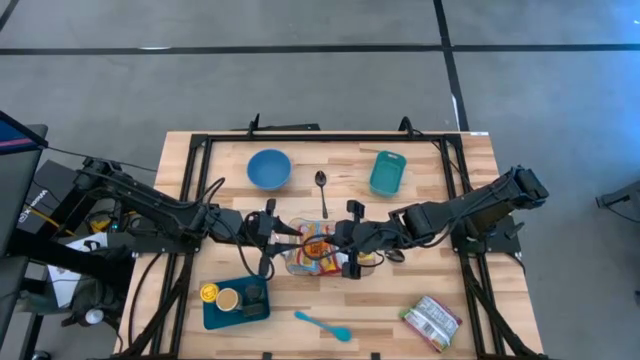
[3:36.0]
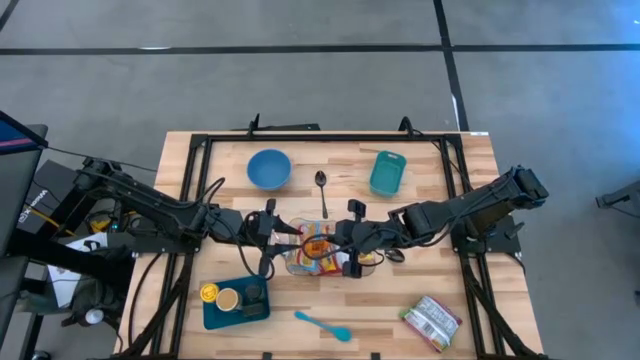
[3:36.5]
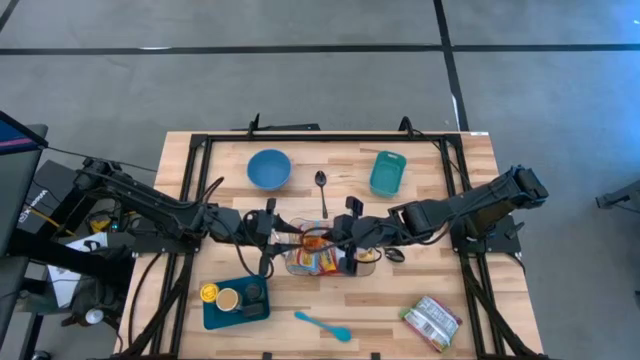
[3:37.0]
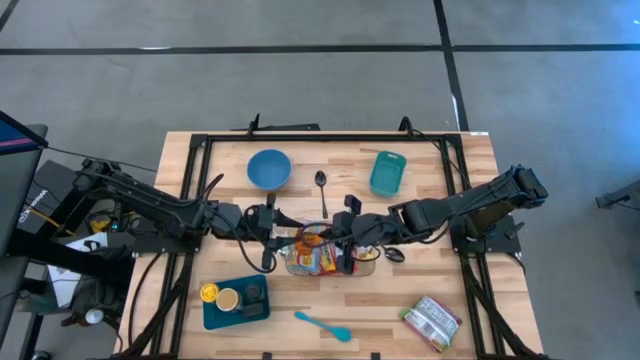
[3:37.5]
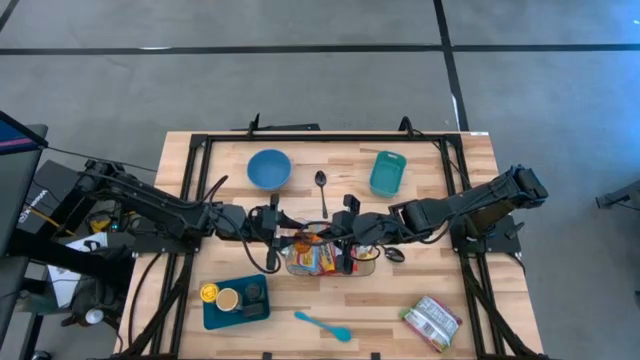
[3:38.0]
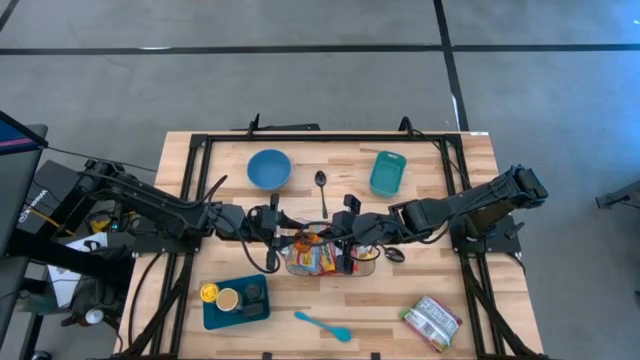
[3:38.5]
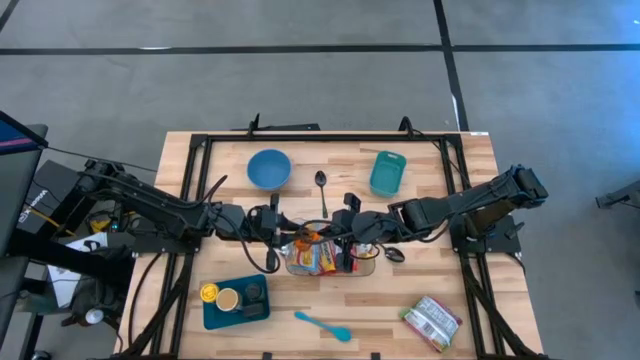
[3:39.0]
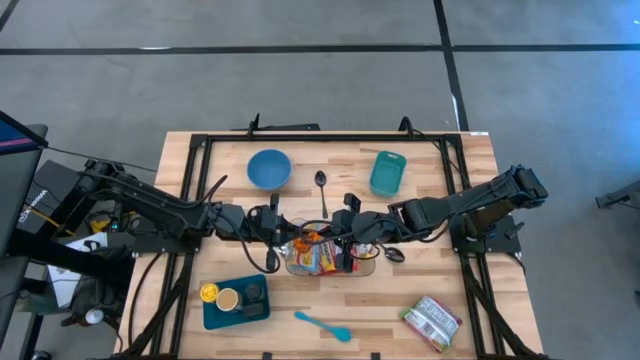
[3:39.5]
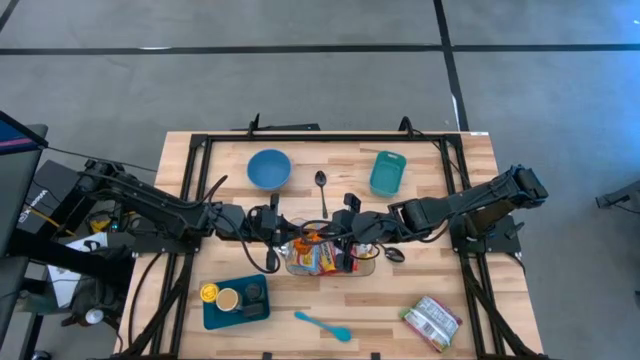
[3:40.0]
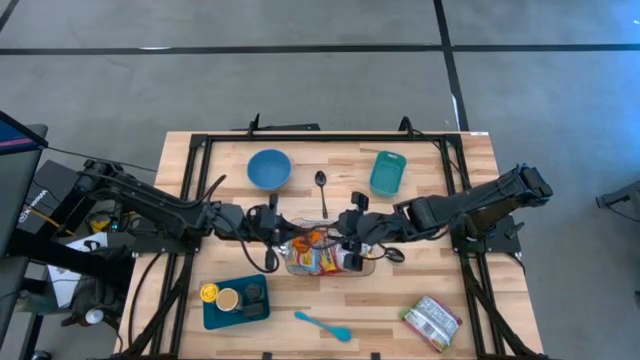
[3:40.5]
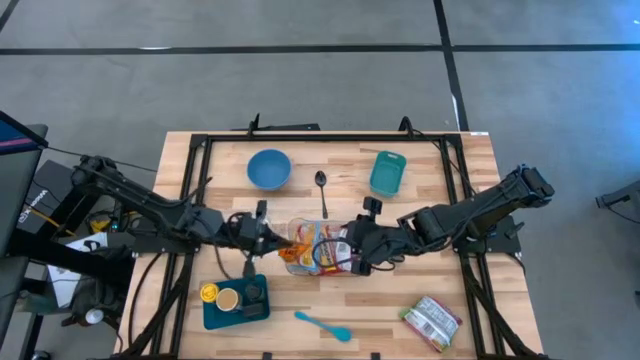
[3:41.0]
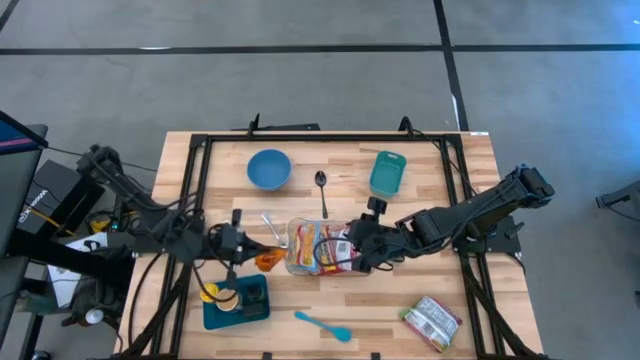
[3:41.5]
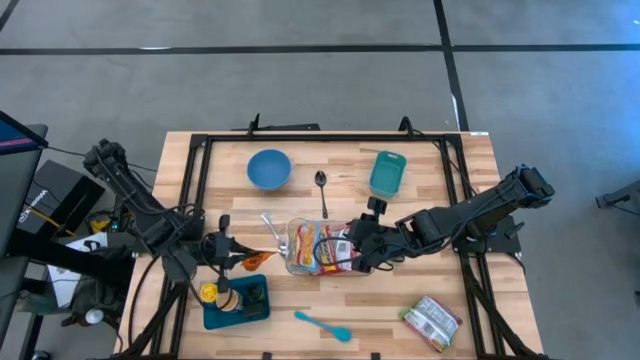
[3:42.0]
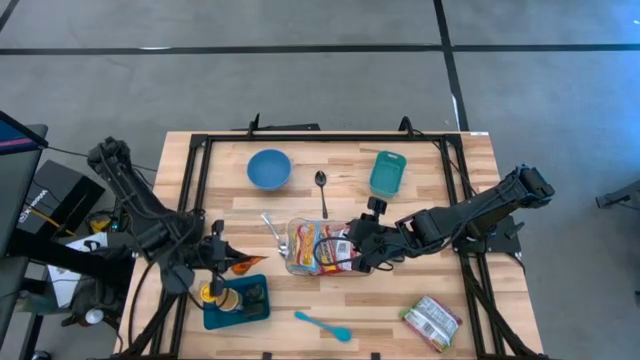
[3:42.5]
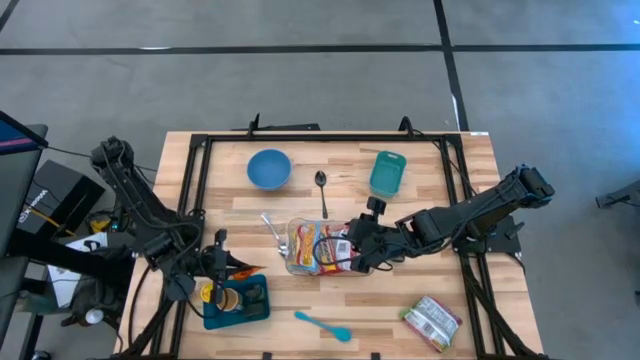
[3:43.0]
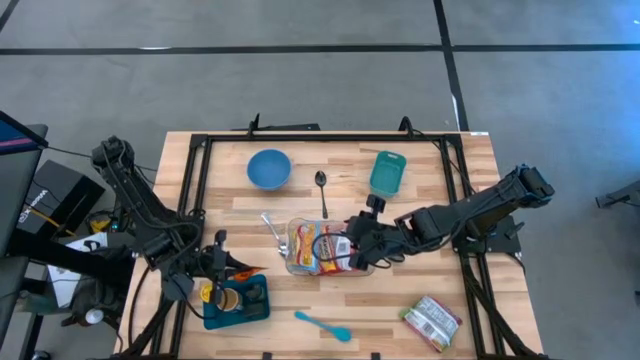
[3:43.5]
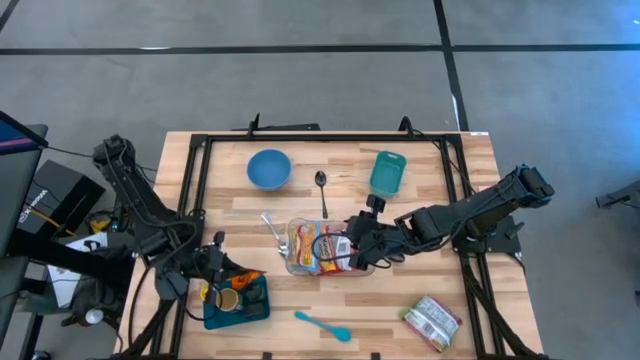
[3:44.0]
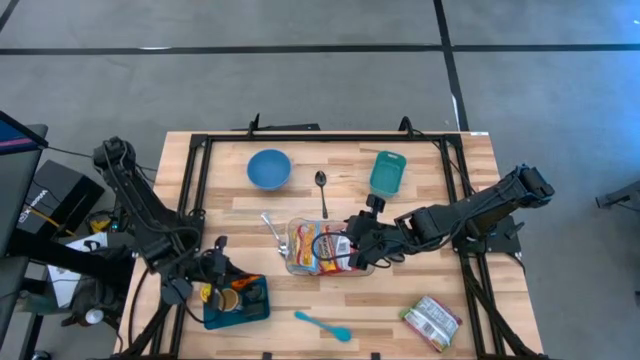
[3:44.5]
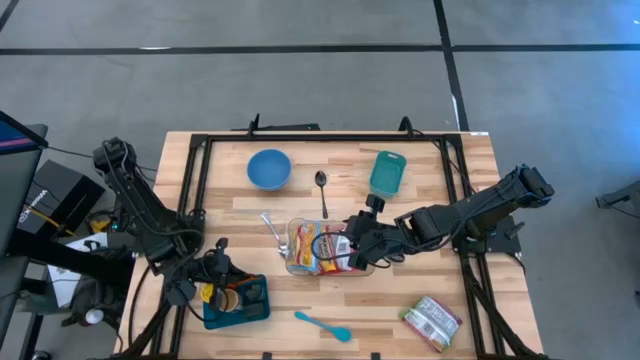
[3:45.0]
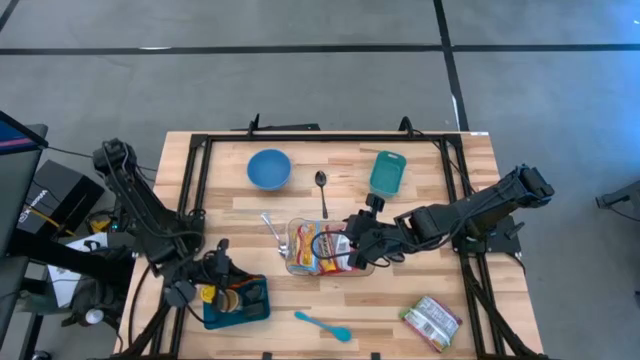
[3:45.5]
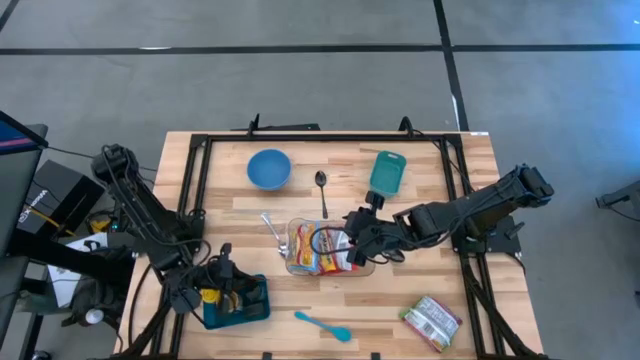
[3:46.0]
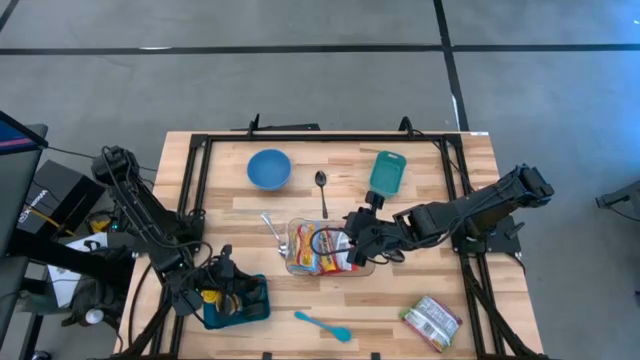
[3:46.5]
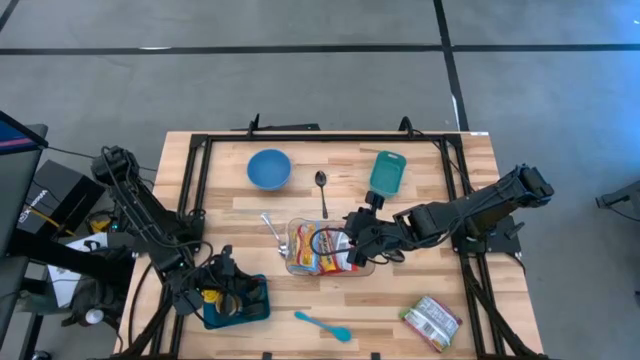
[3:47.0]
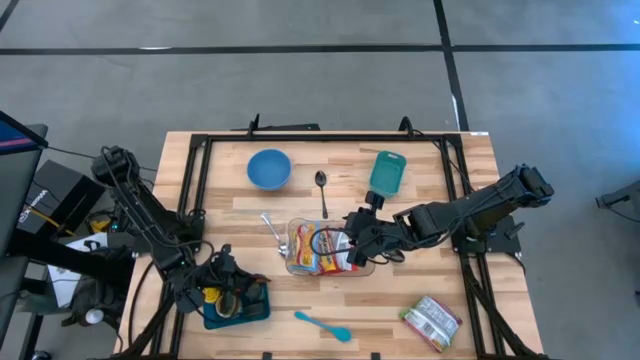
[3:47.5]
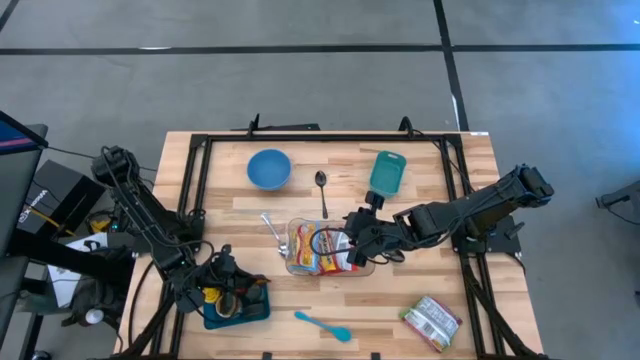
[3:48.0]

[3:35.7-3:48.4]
Task: Pick & Place Food Item
Put the orange spice bag into the dark blue bin

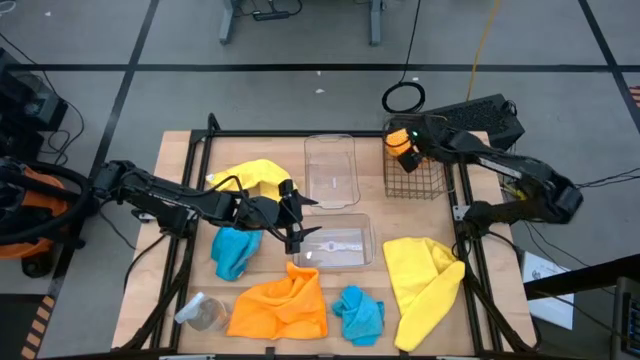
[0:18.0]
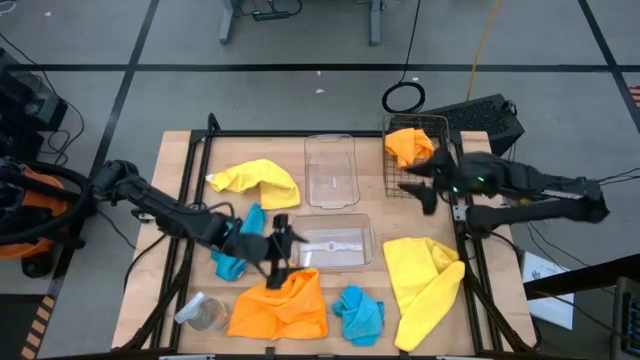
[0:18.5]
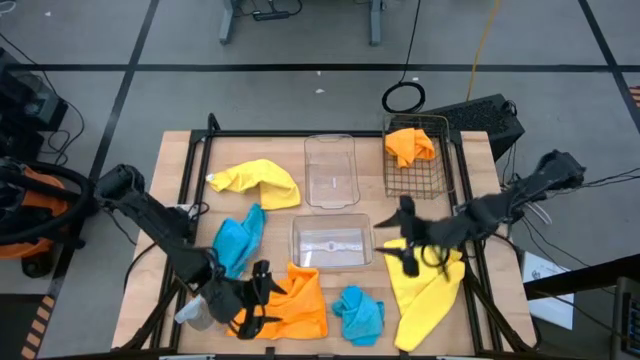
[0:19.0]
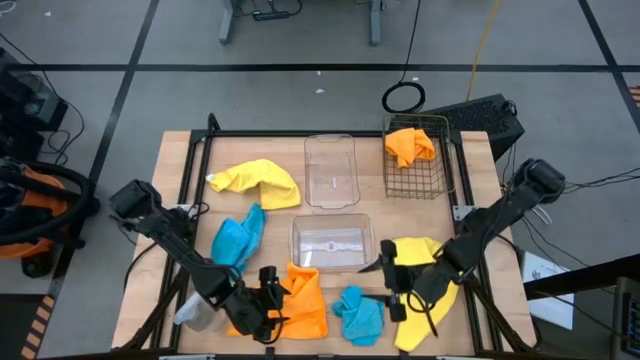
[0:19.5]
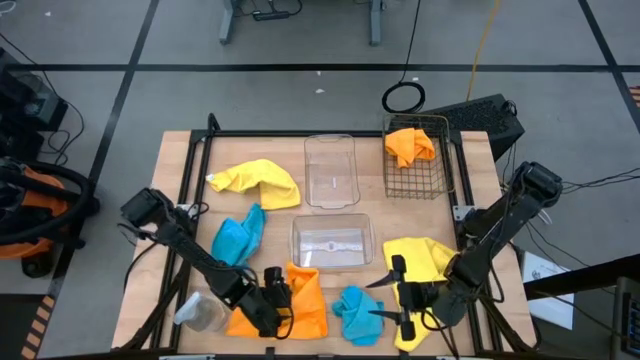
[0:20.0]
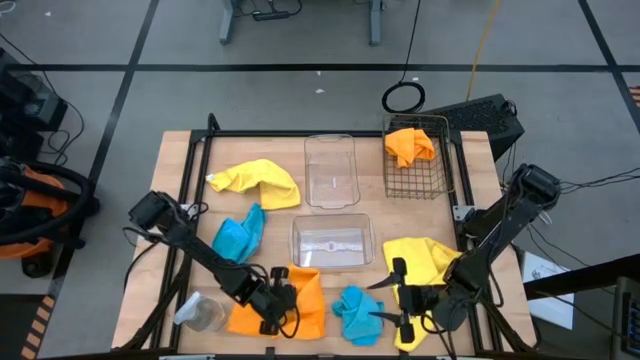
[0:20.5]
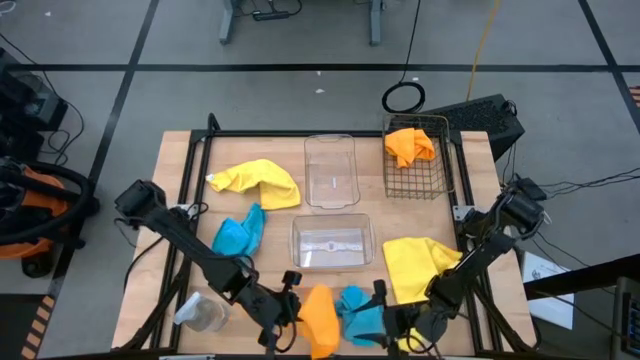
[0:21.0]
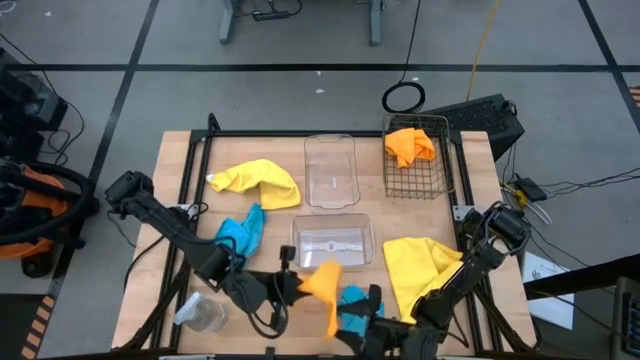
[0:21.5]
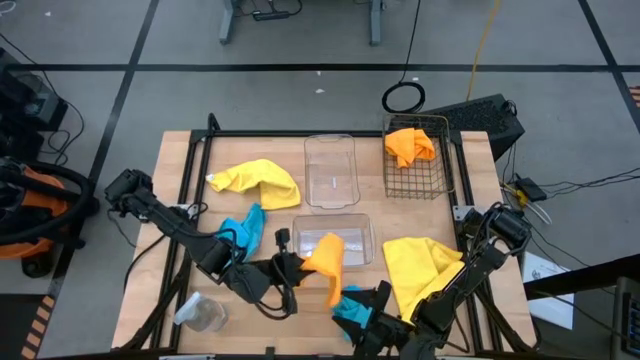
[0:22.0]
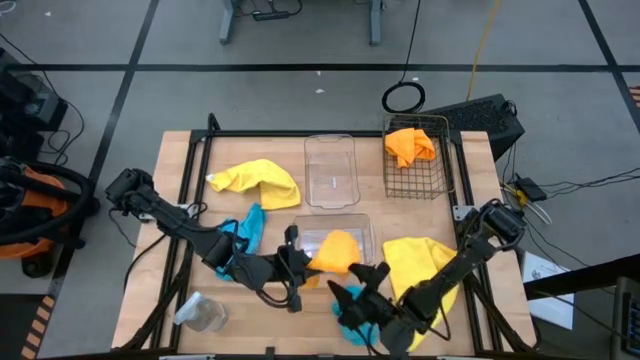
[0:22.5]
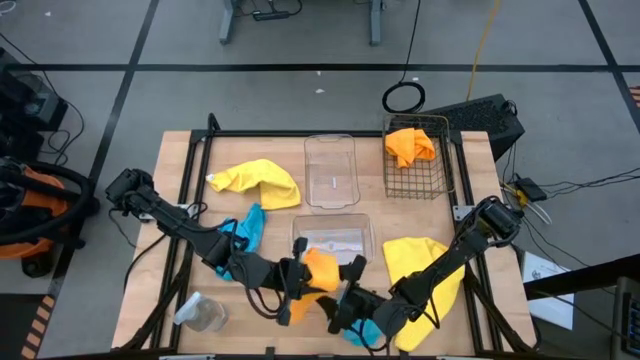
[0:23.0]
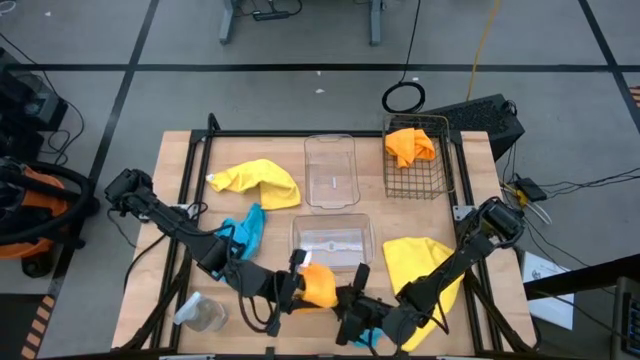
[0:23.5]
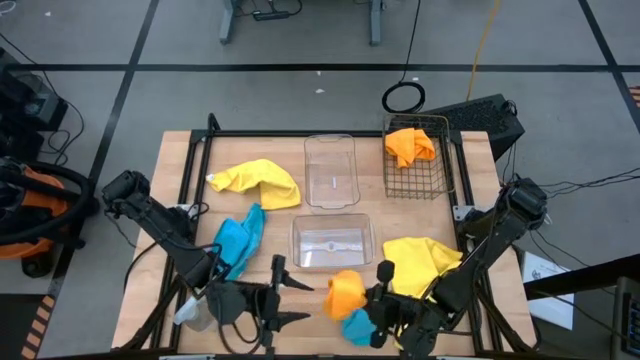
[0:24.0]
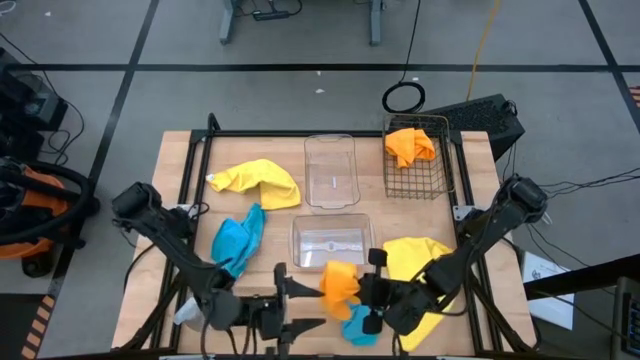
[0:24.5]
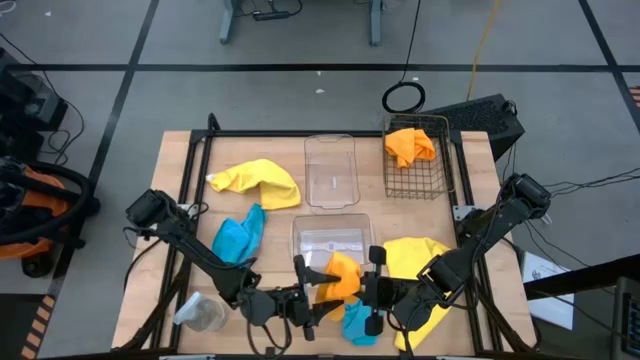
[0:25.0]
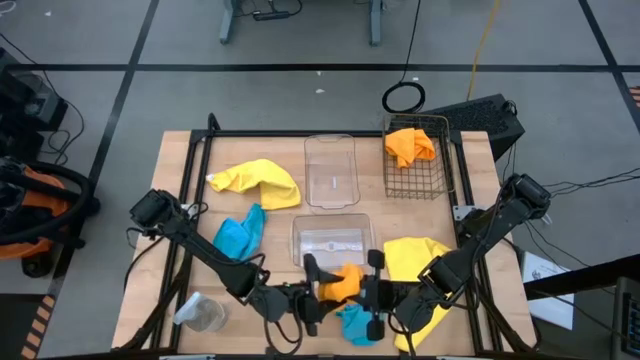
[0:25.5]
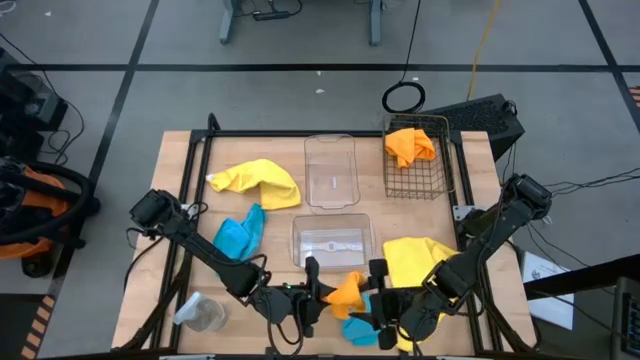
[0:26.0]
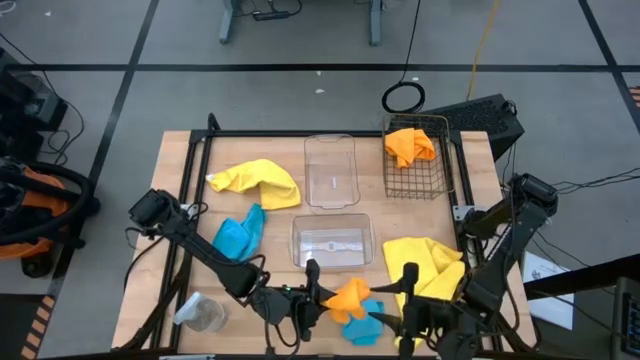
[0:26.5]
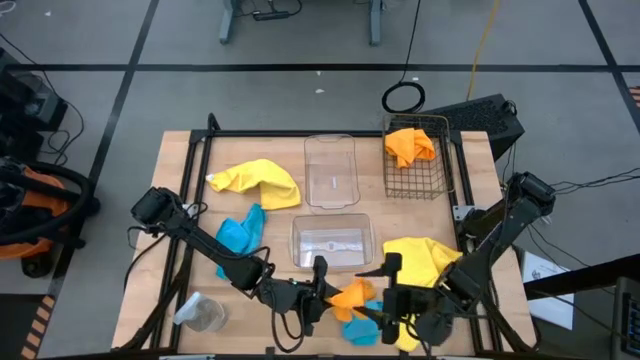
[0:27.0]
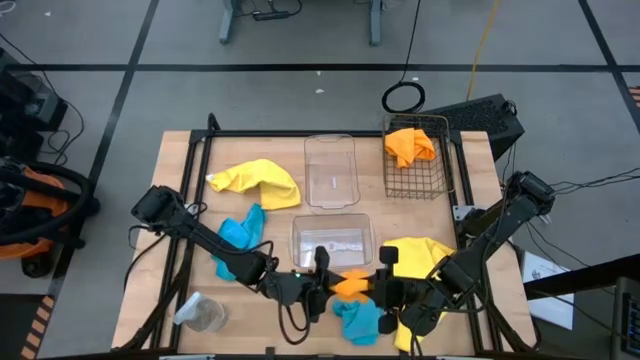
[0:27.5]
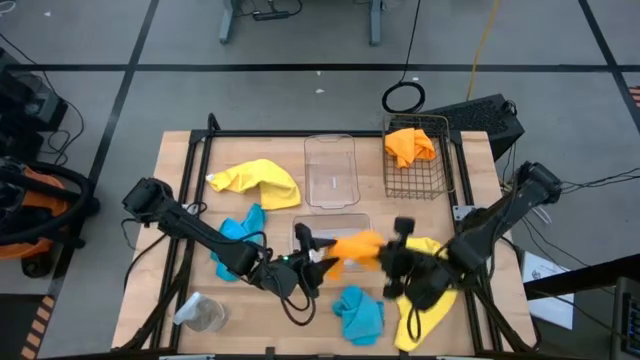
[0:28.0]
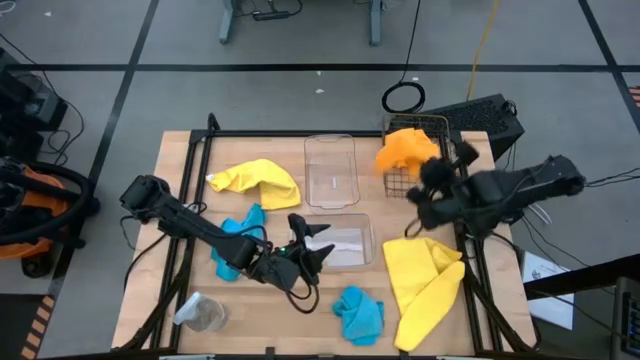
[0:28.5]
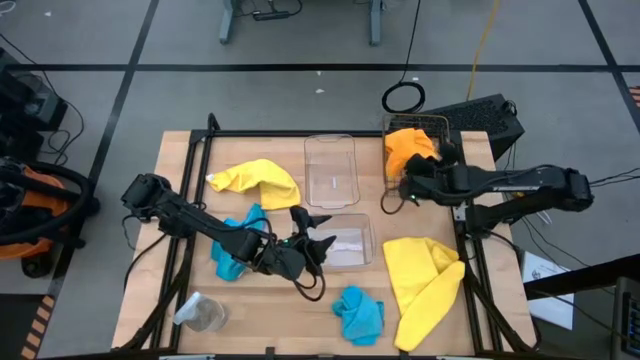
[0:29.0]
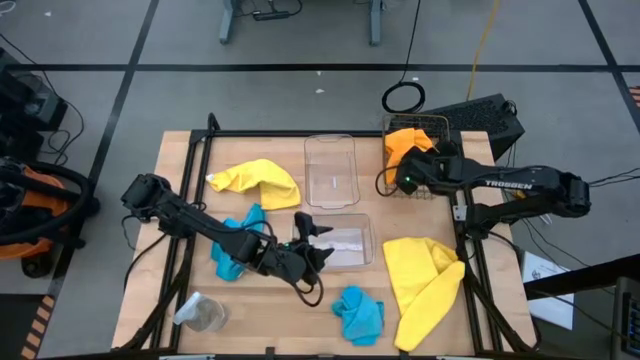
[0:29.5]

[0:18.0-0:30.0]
Task: Sort microfiber towel by color & place in baskets
Put the orange microfiber towel into the black metal basket
